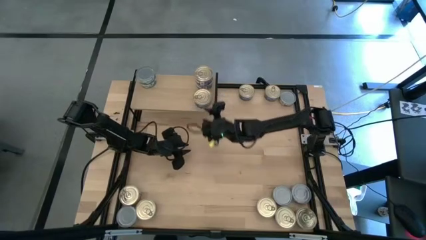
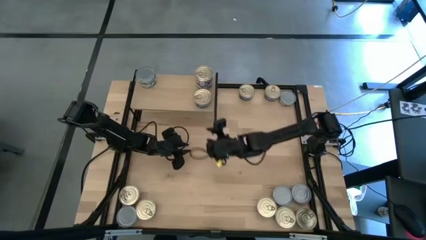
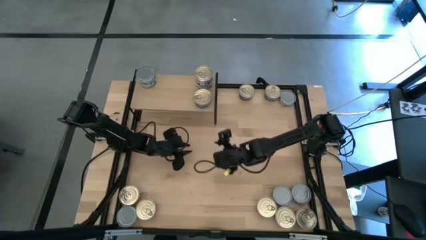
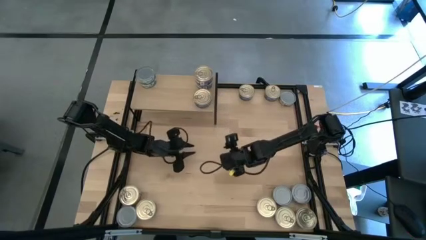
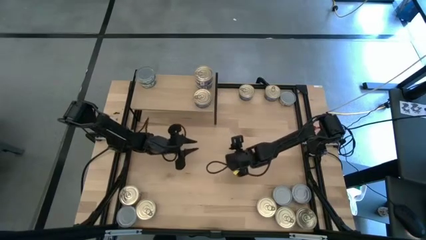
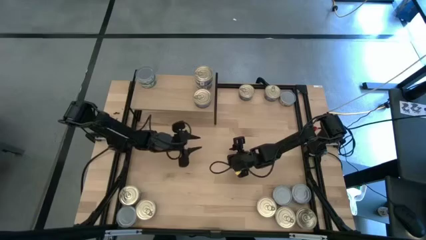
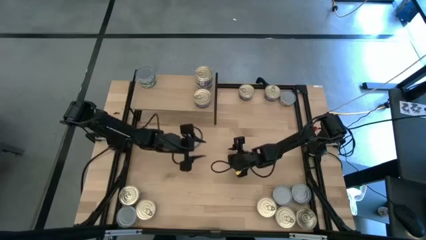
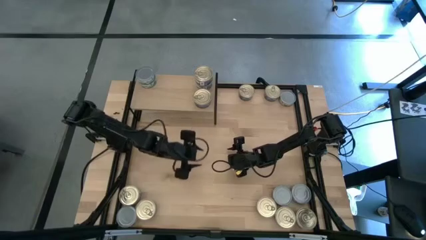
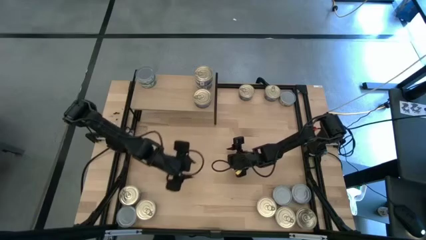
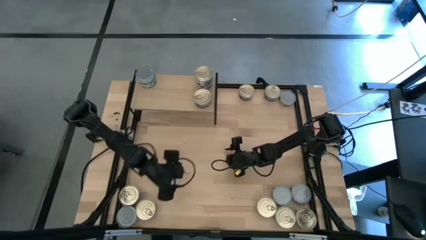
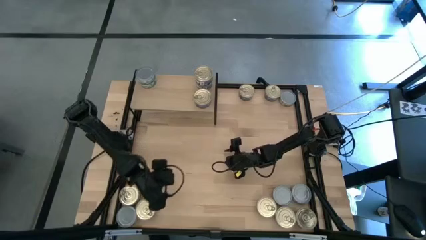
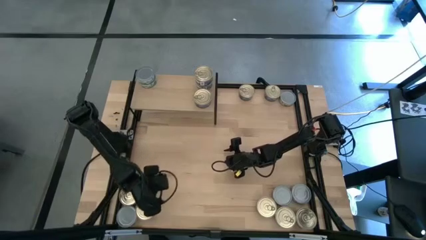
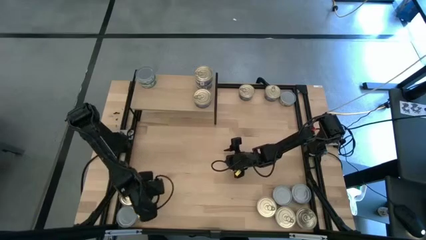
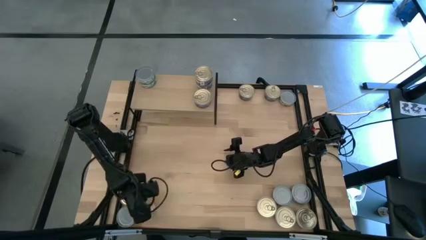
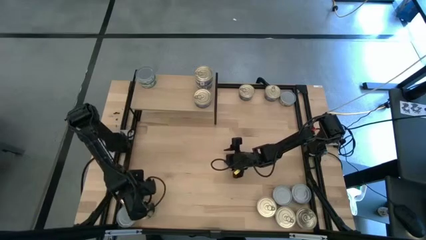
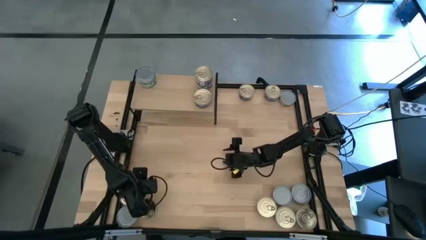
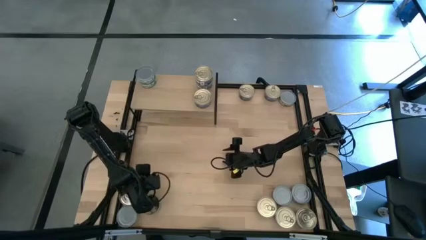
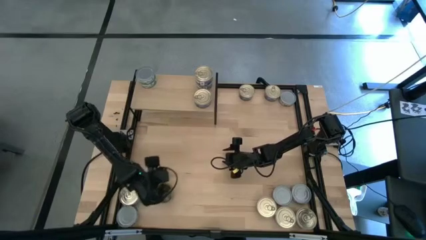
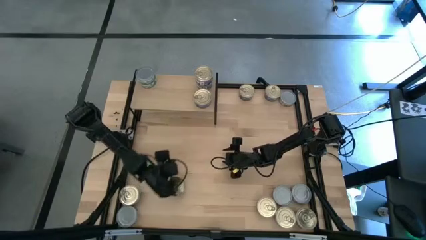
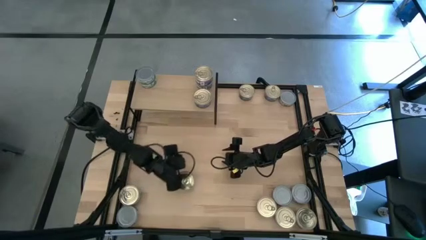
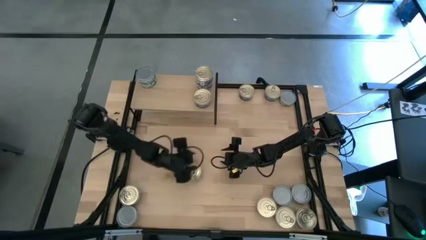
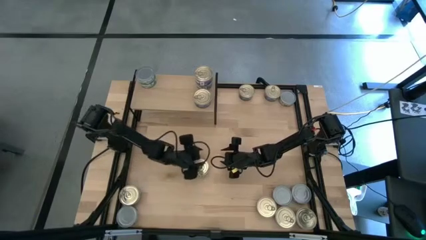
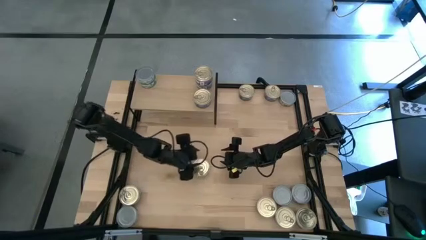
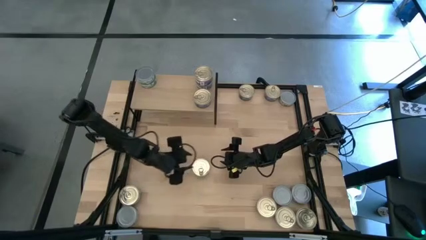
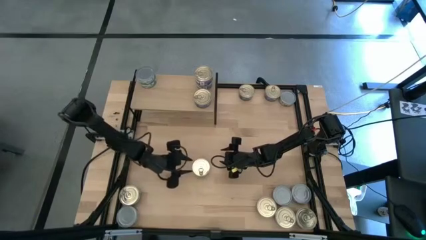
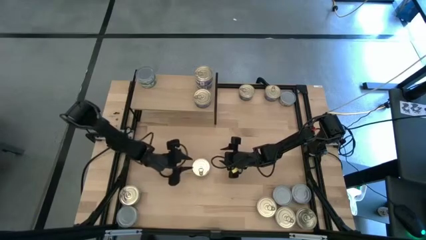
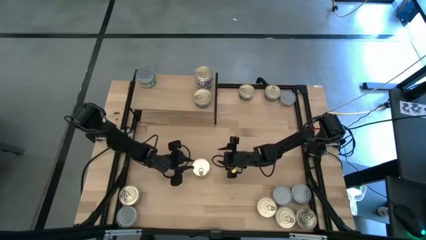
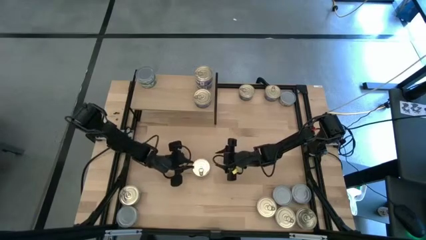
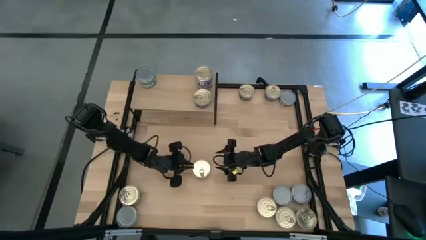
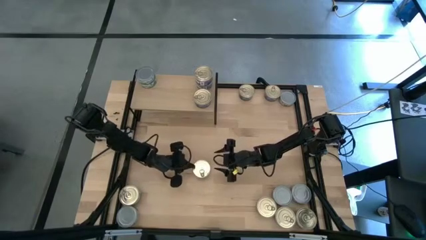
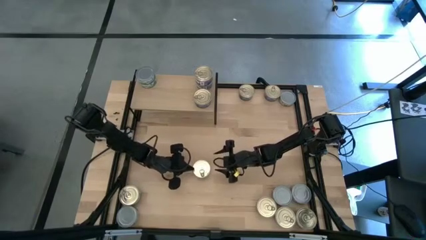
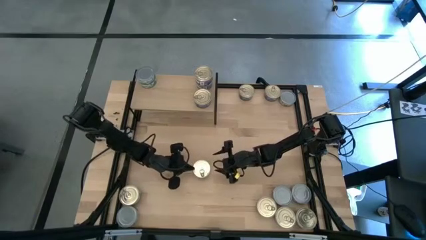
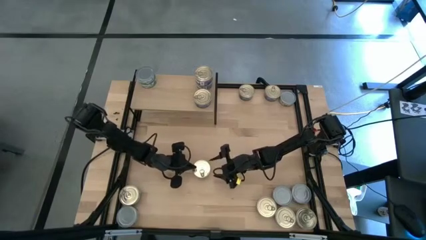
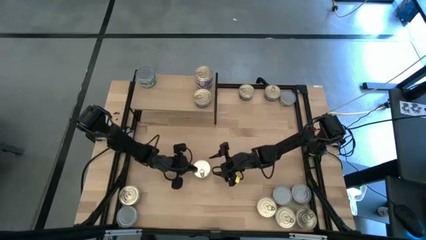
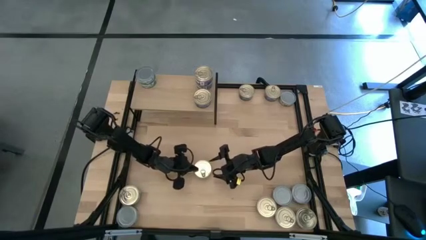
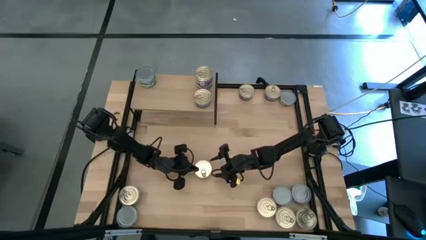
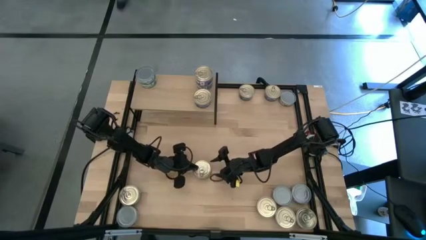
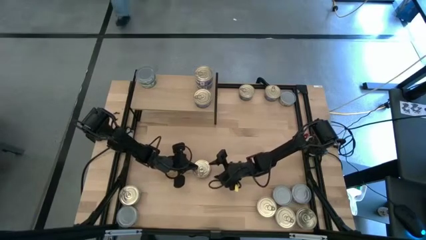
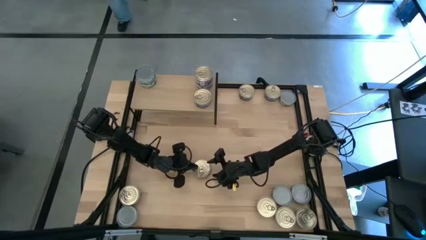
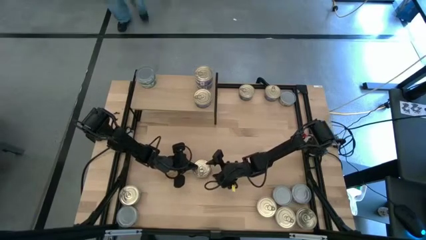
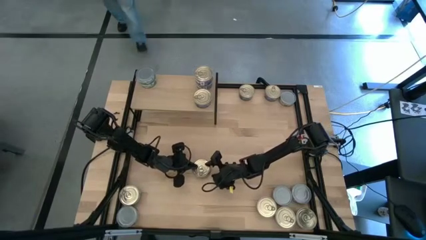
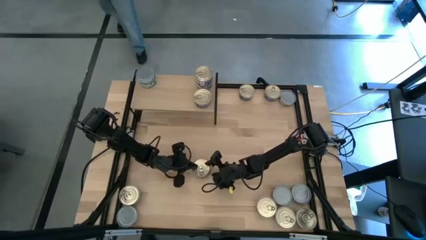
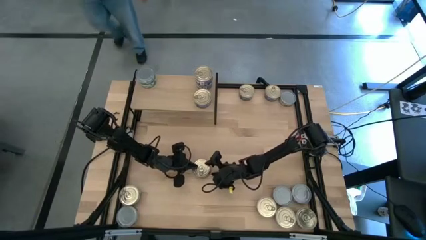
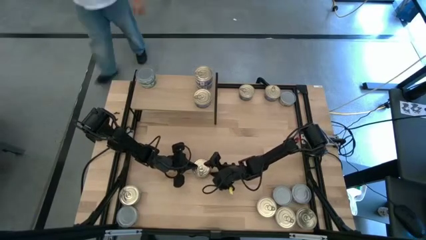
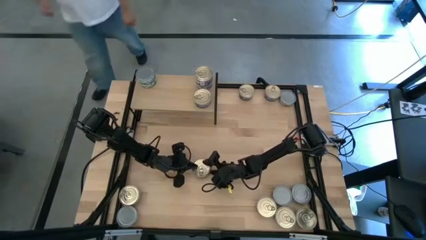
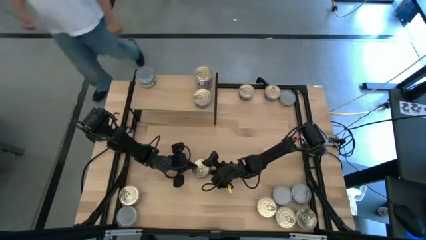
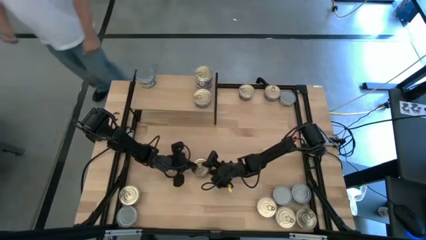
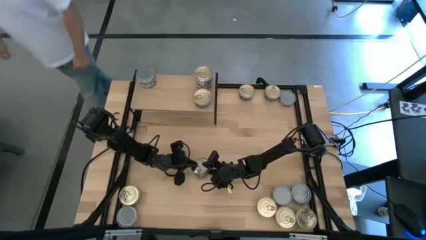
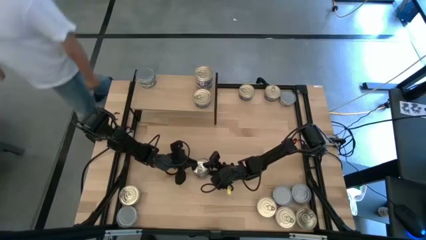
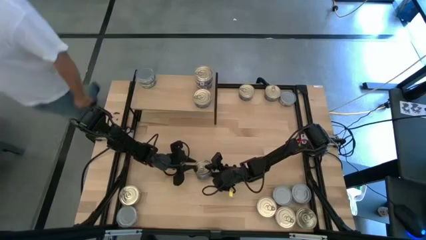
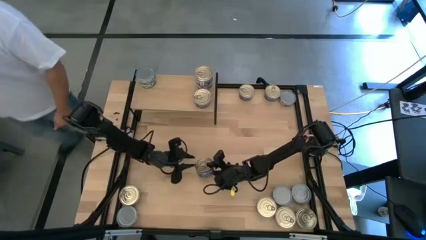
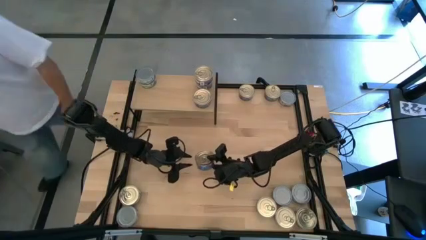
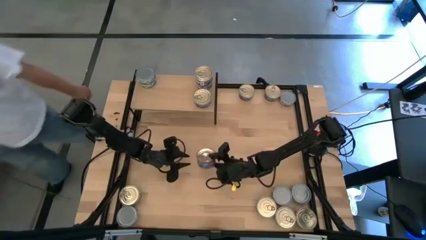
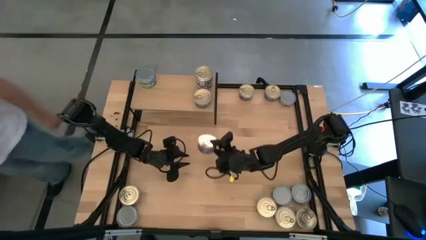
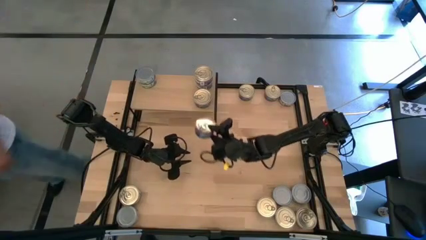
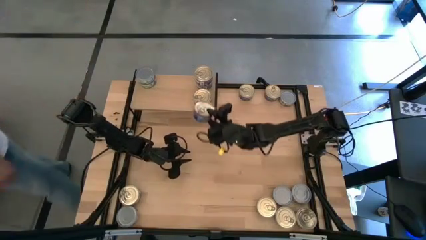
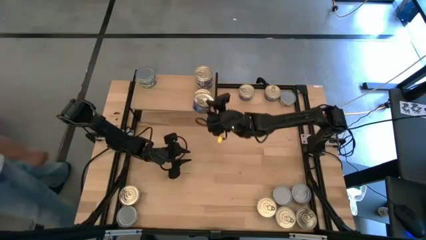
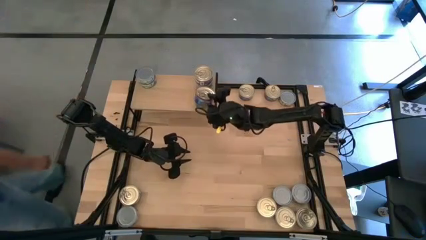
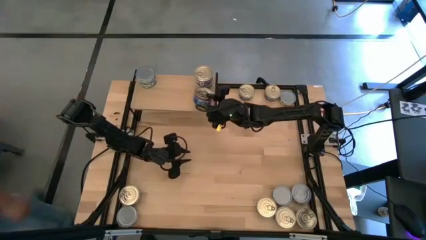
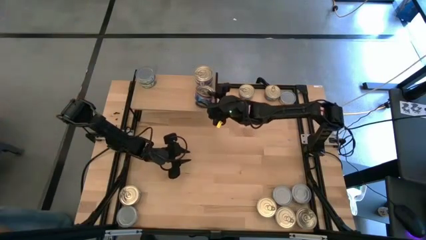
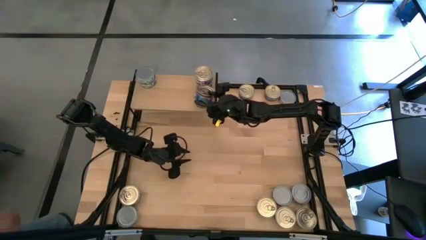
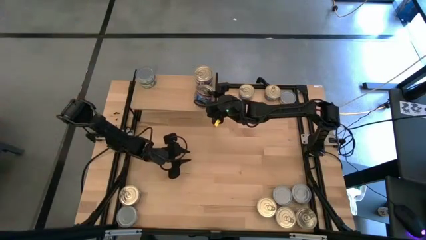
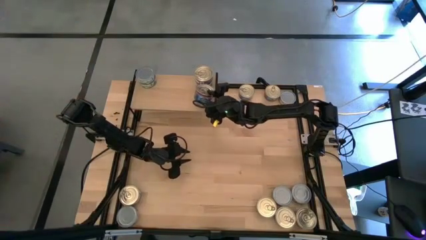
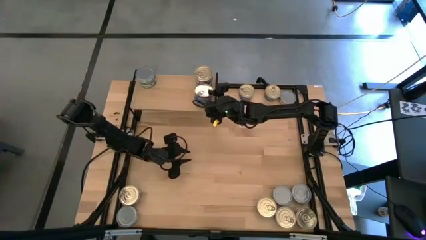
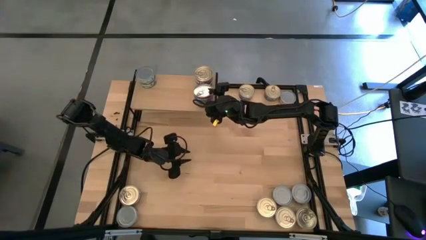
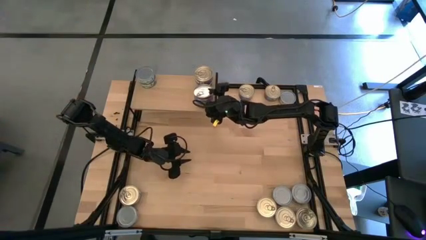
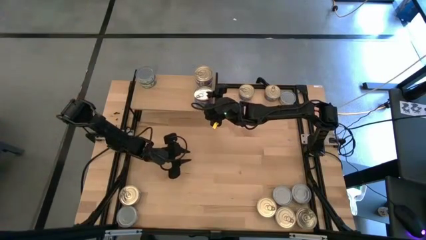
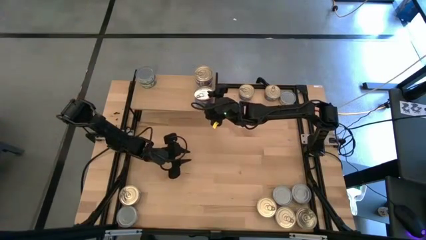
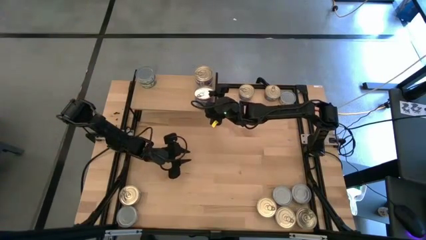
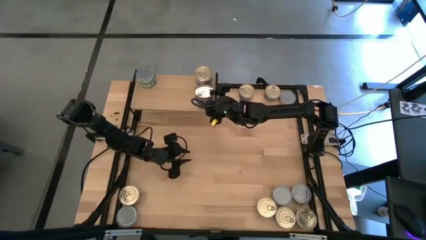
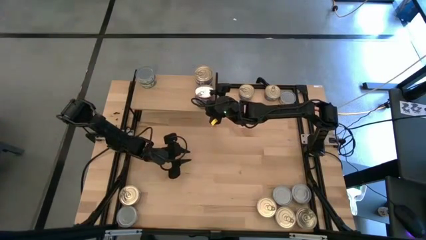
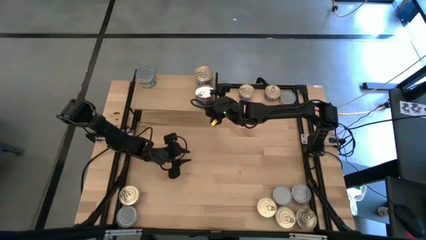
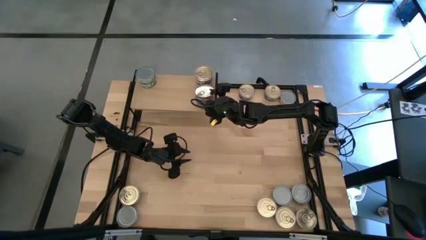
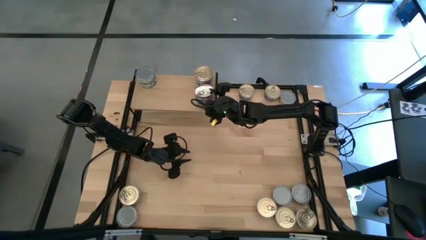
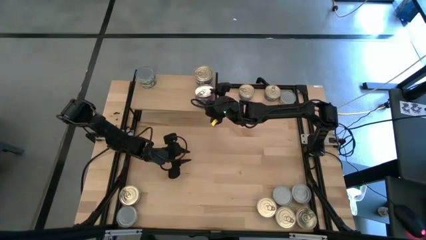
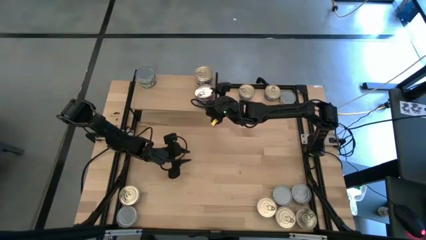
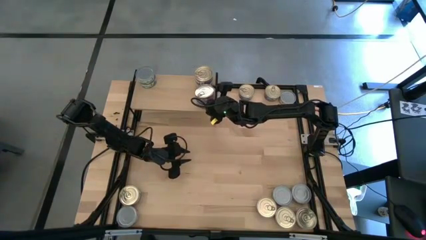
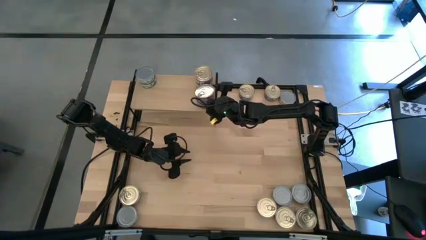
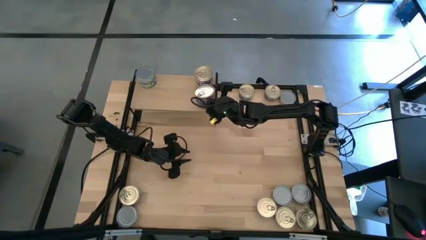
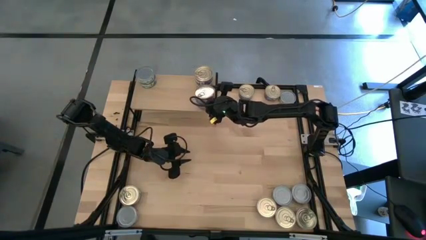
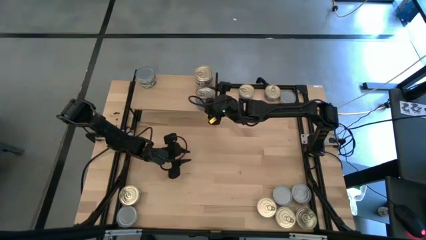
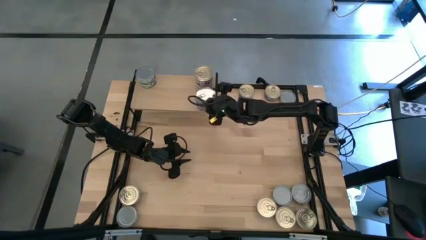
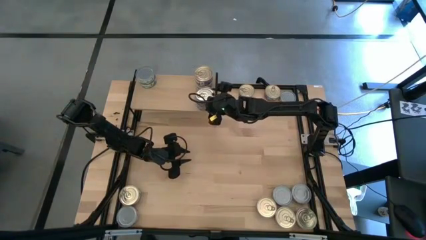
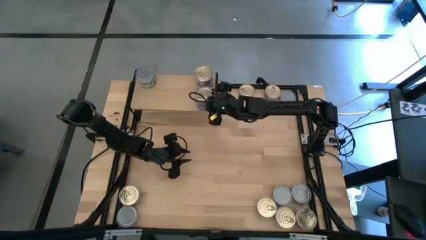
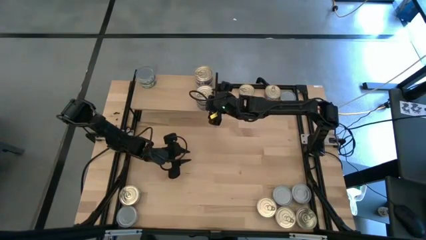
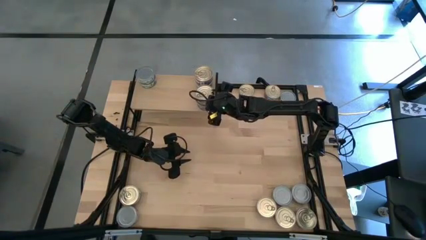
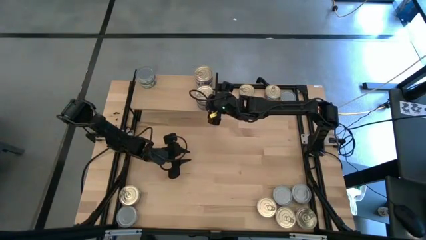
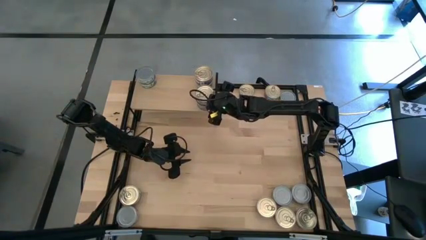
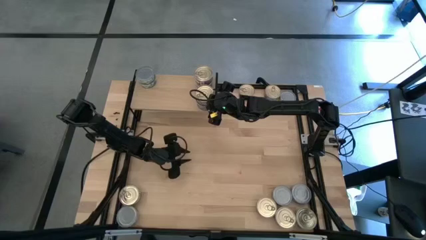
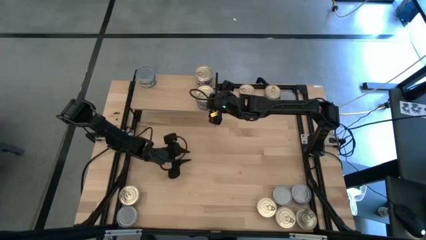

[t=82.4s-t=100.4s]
Task: Stack canned seafood by type on shelf
Stack the blue tuna can on top of the blue tuna can on the shelf
